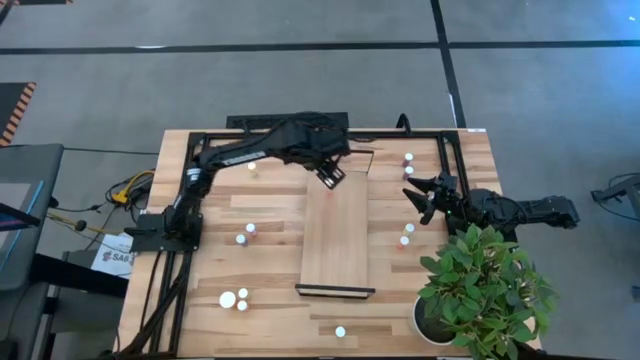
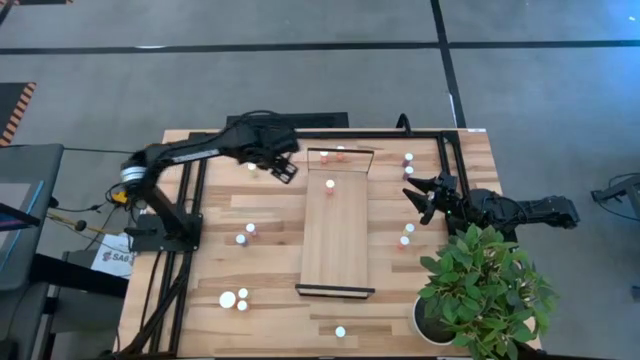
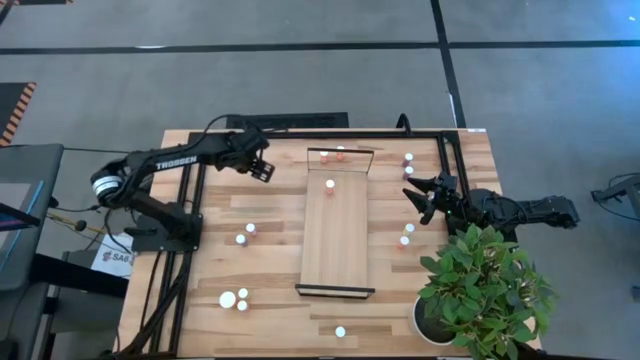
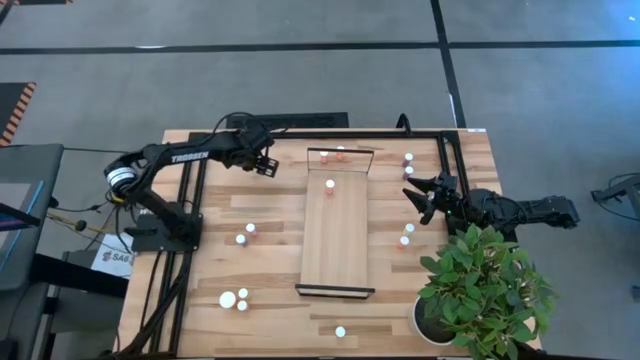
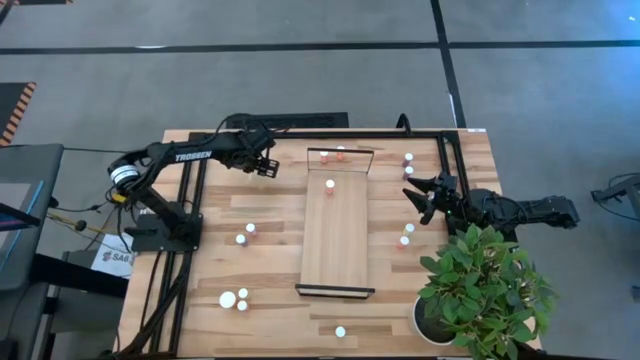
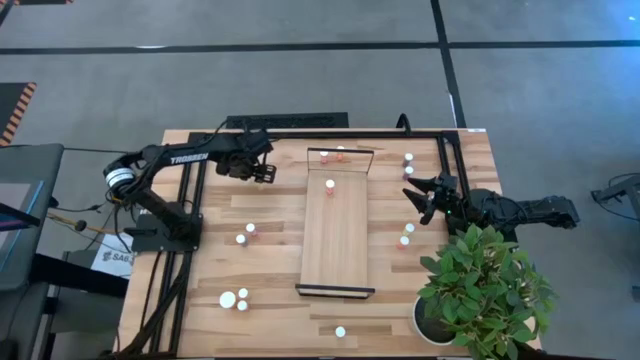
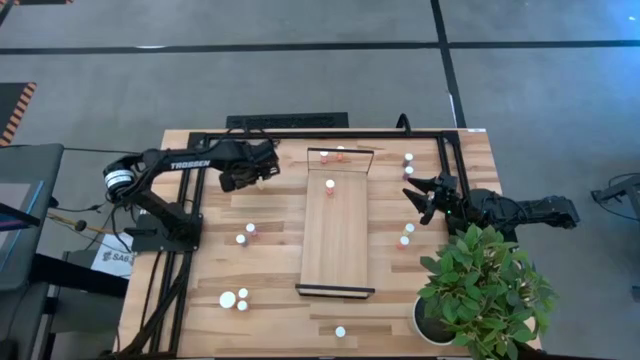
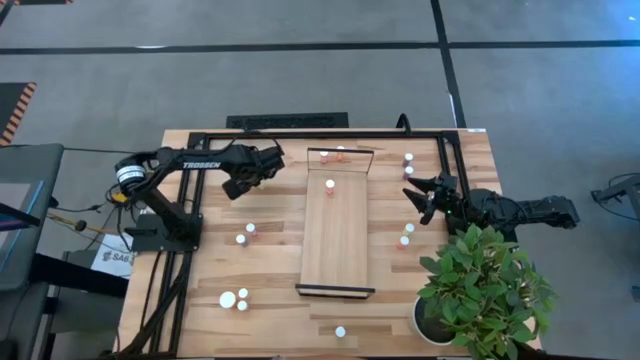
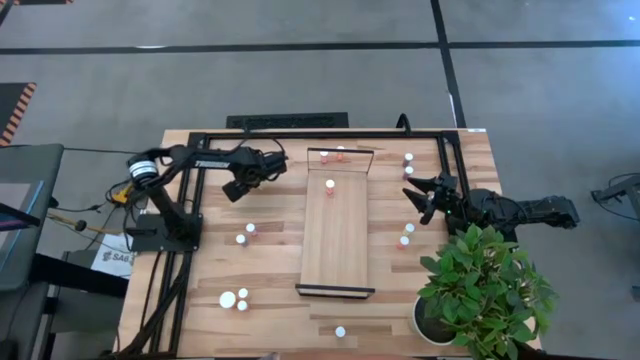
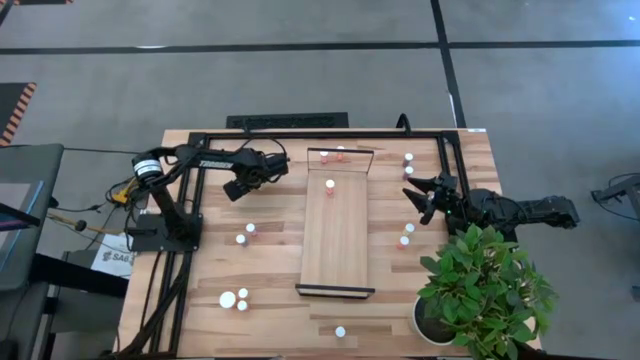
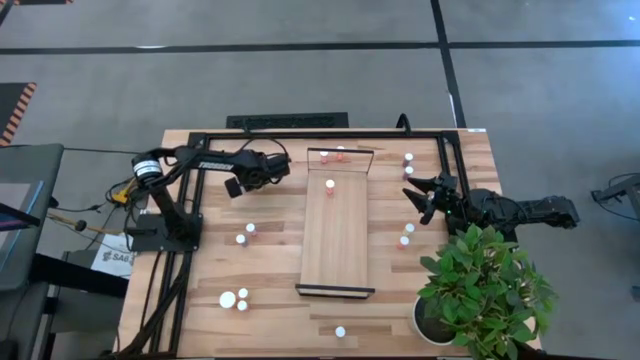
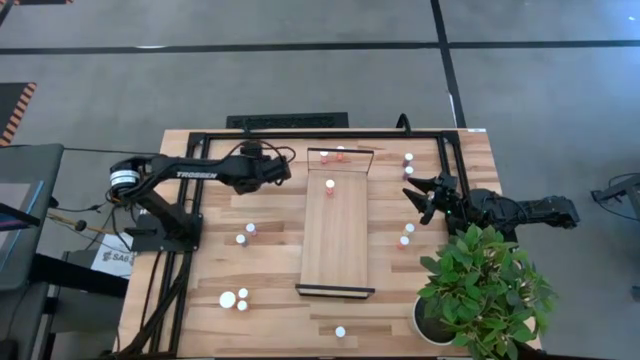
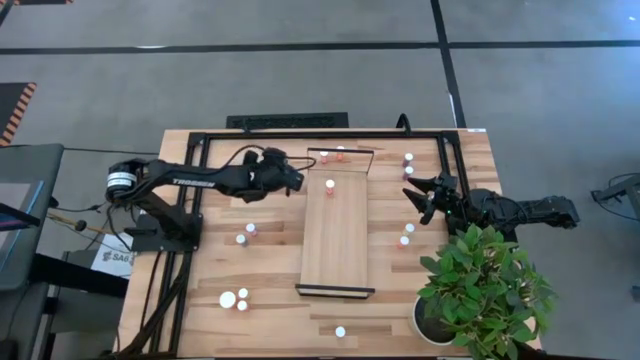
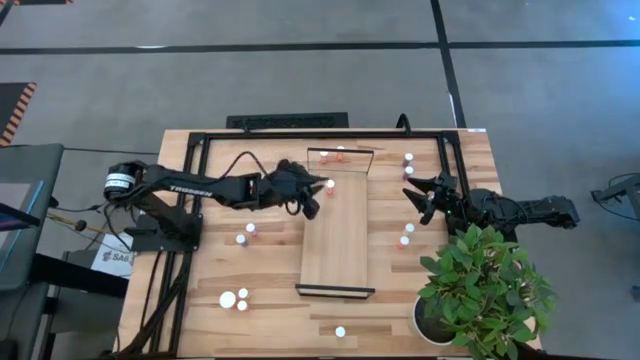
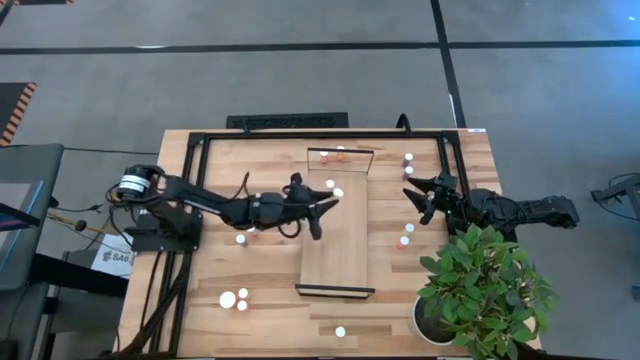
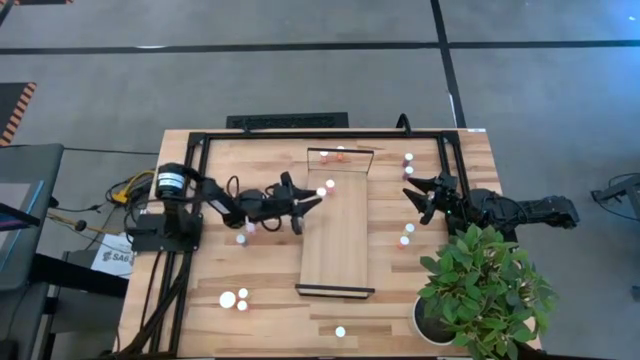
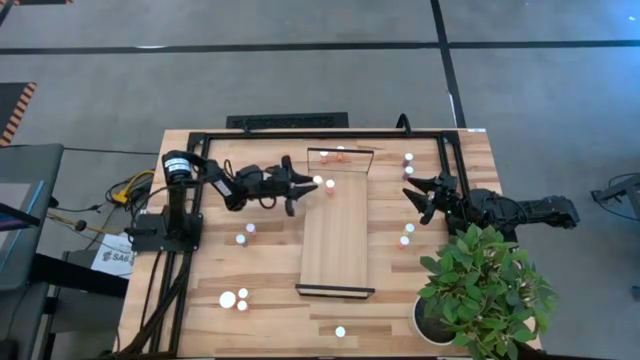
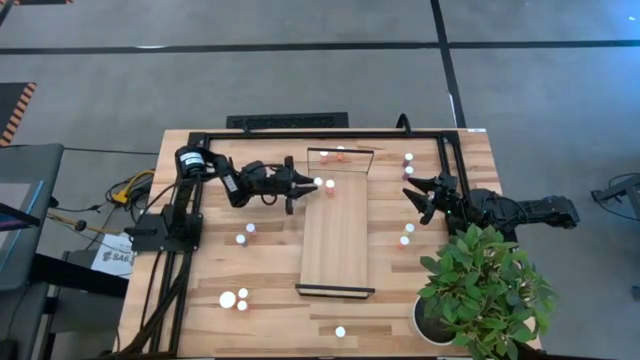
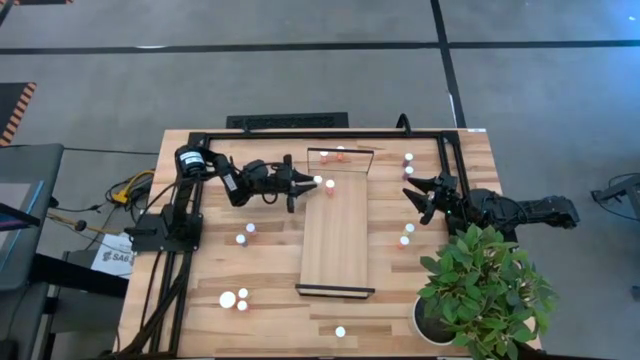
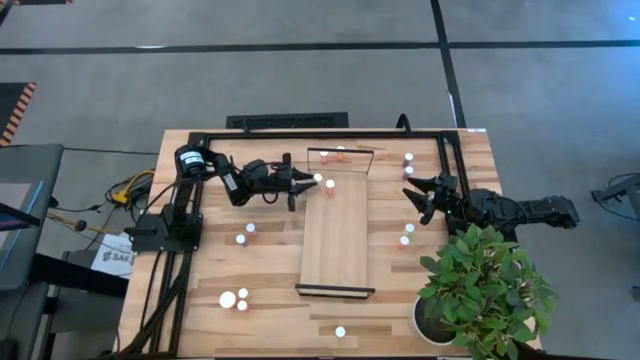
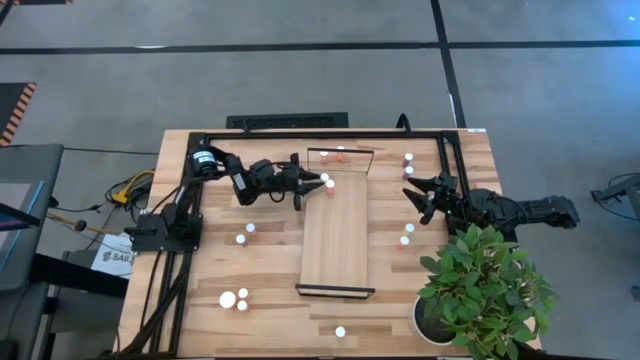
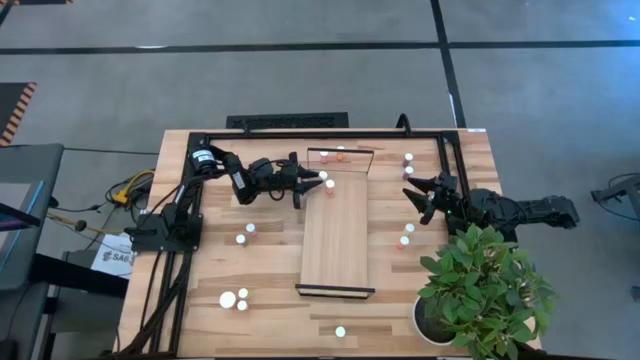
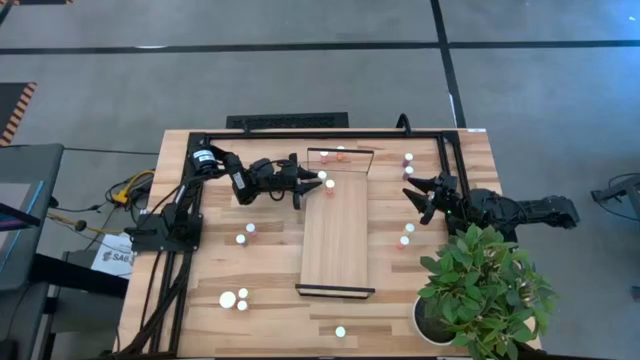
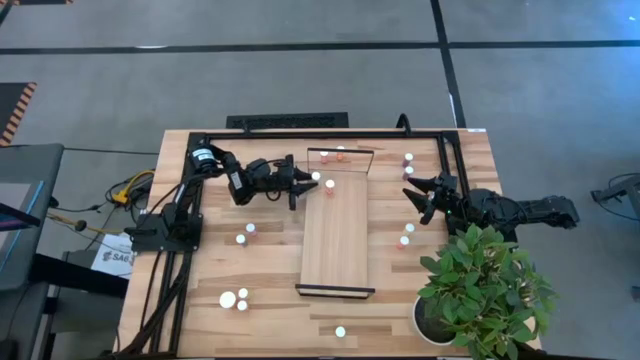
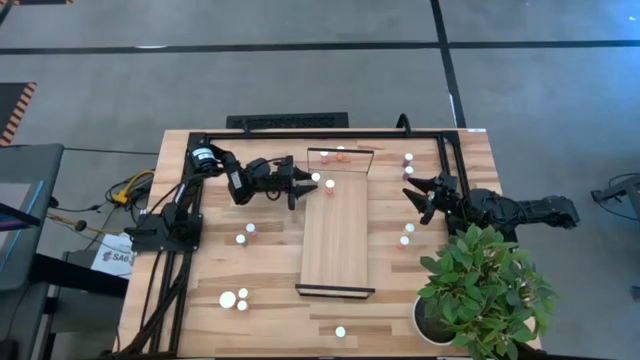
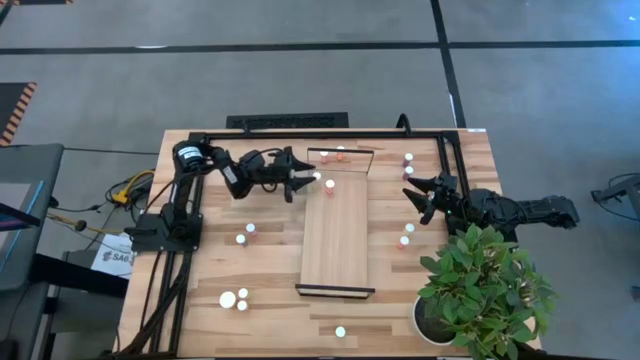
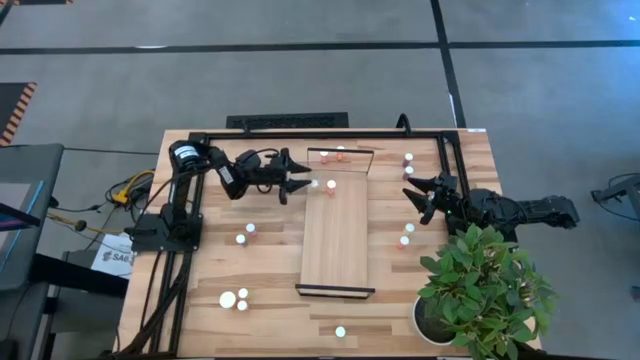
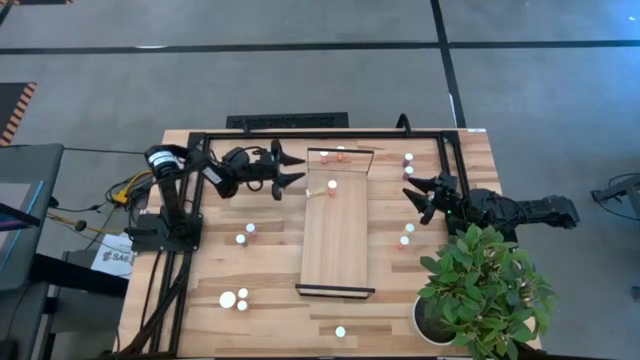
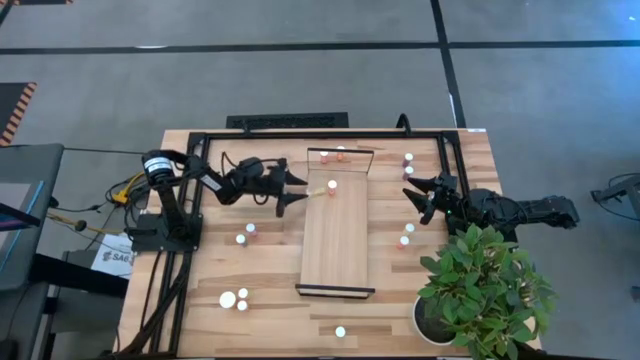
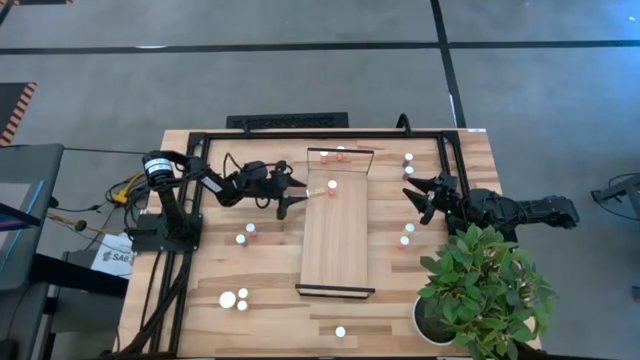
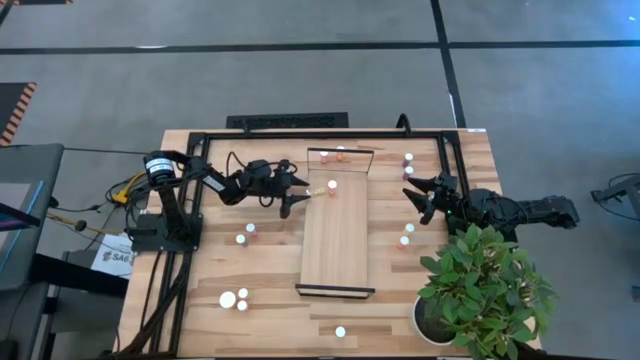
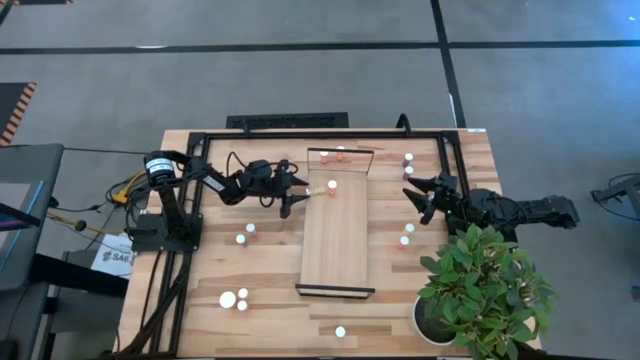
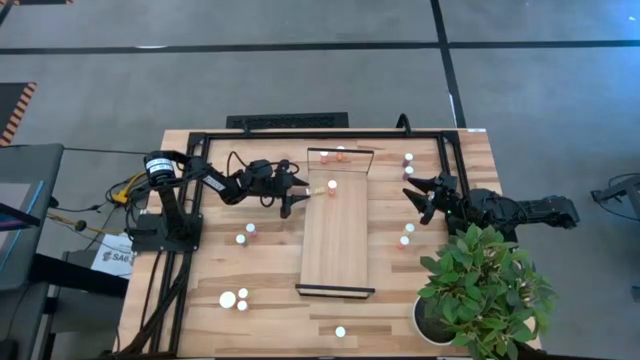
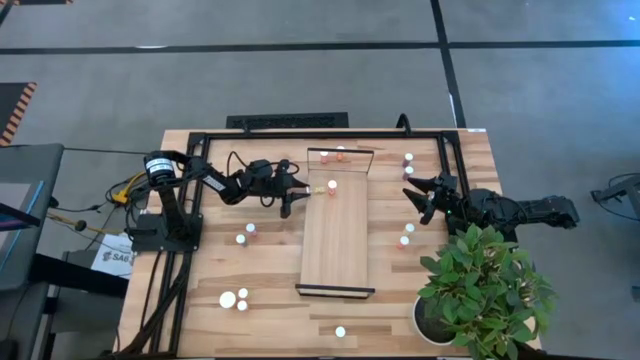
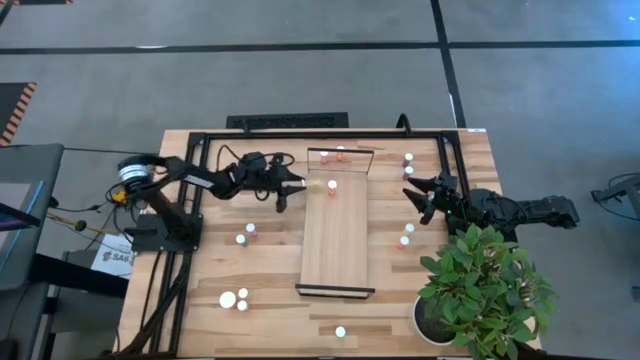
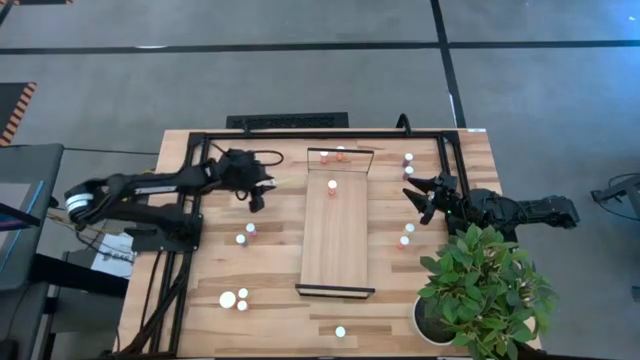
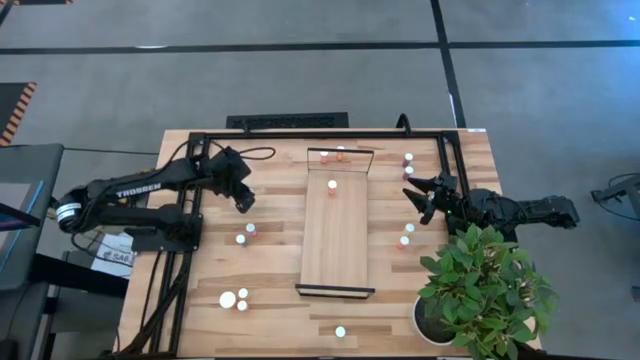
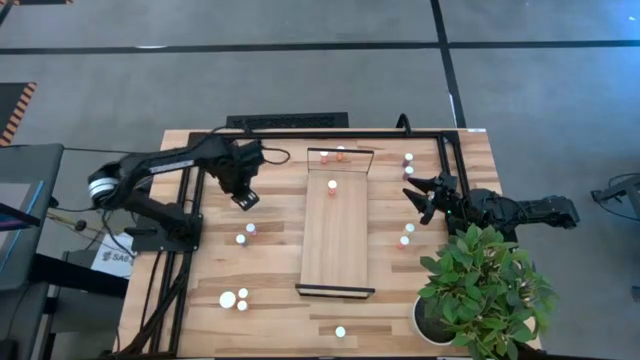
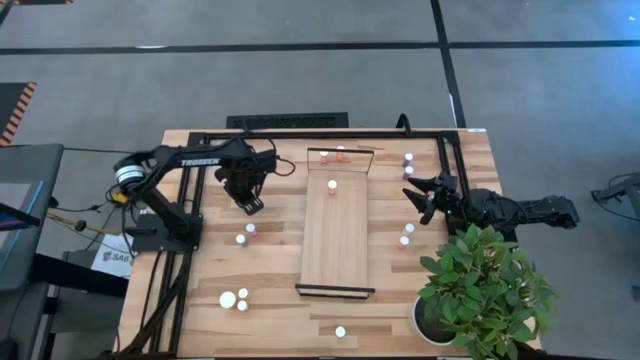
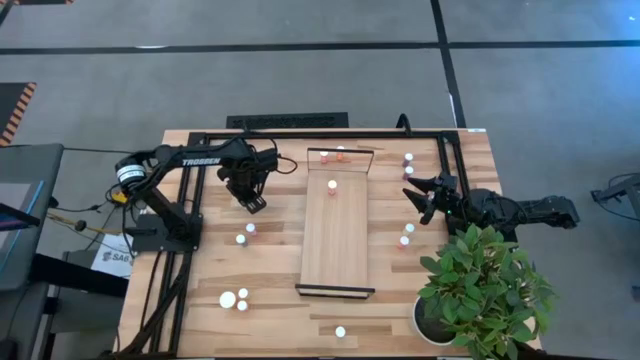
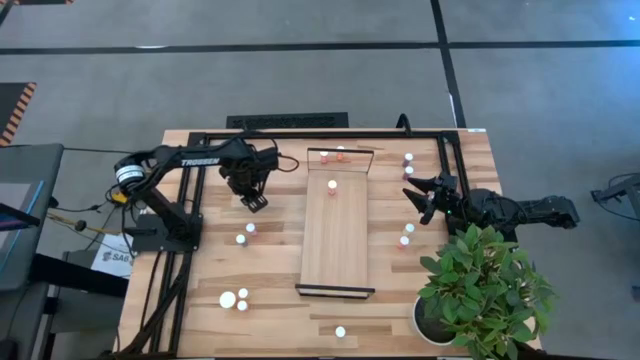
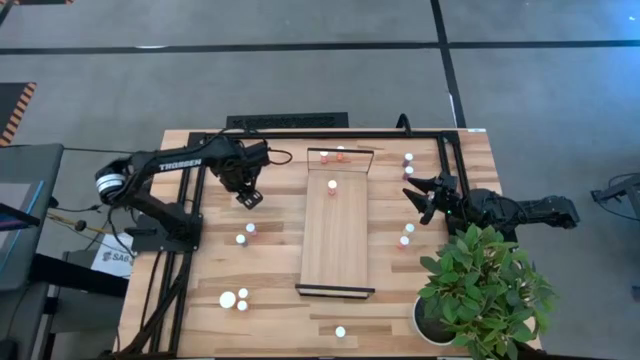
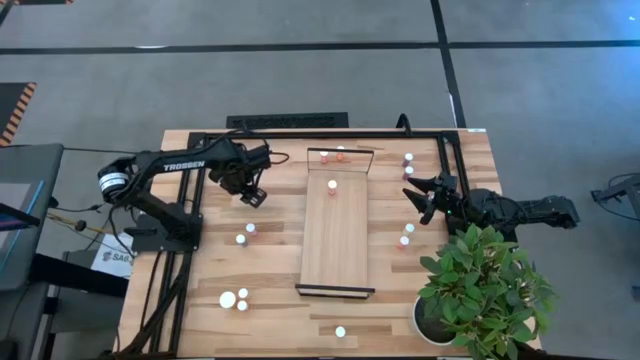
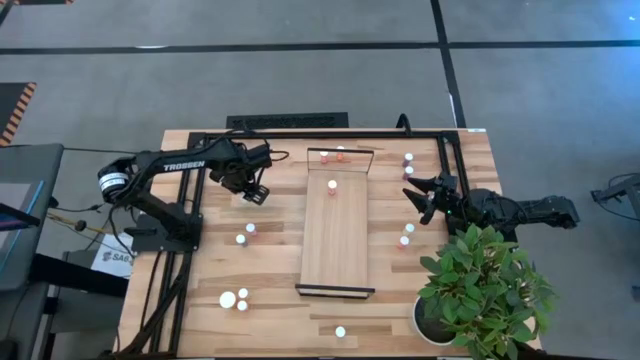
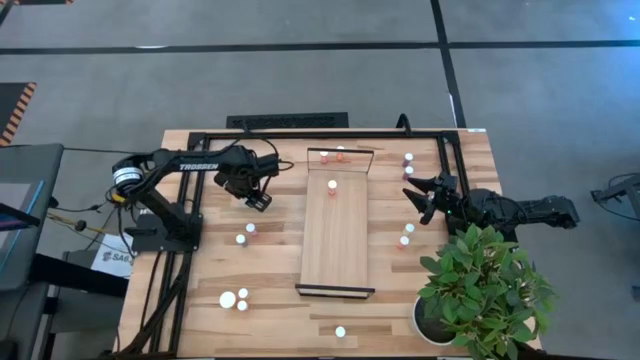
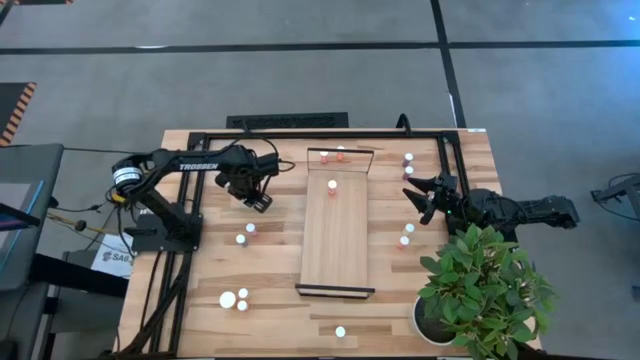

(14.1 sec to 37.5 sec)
Task: Pick and place medicine bottles onto shelf by color
Put the yellow pill bottle on the shelf
